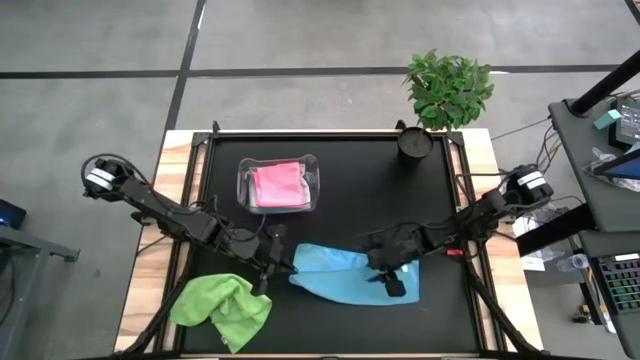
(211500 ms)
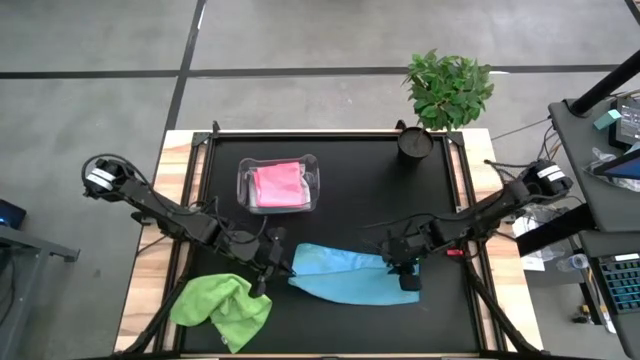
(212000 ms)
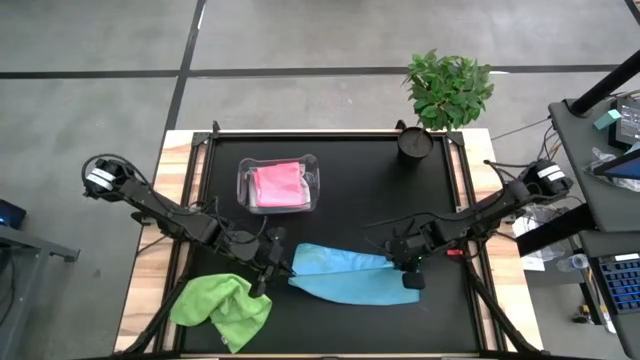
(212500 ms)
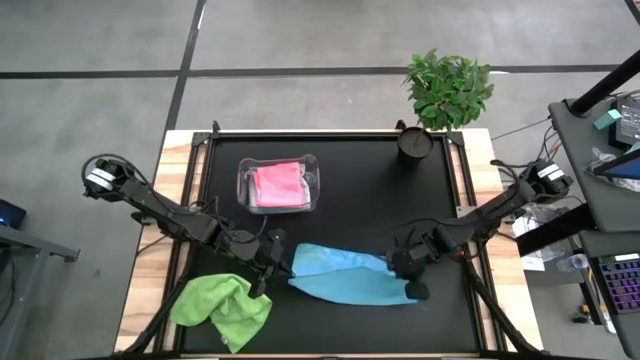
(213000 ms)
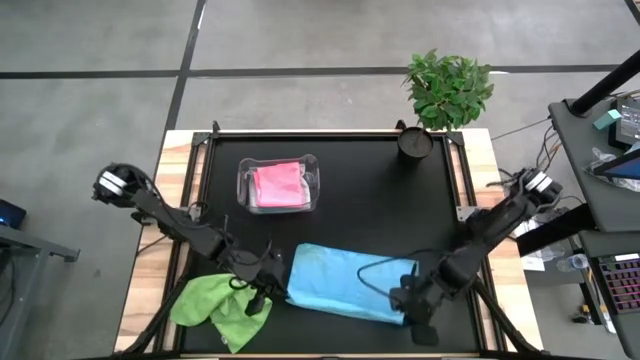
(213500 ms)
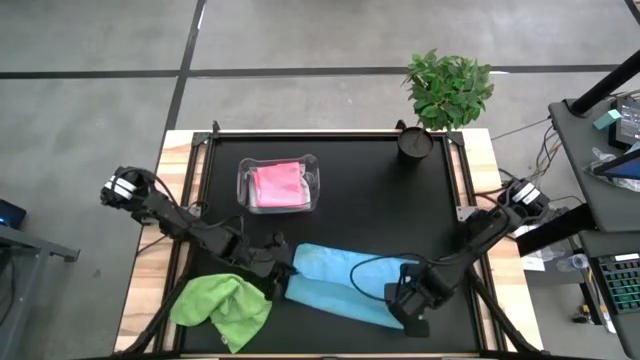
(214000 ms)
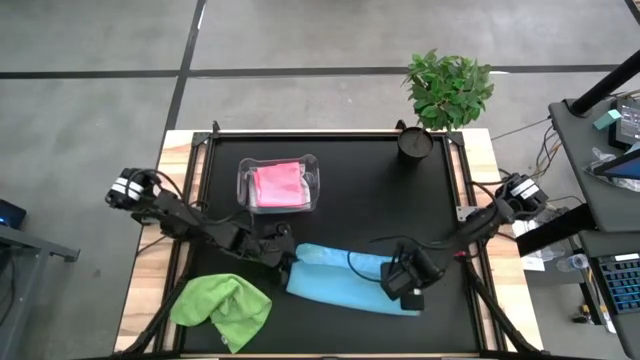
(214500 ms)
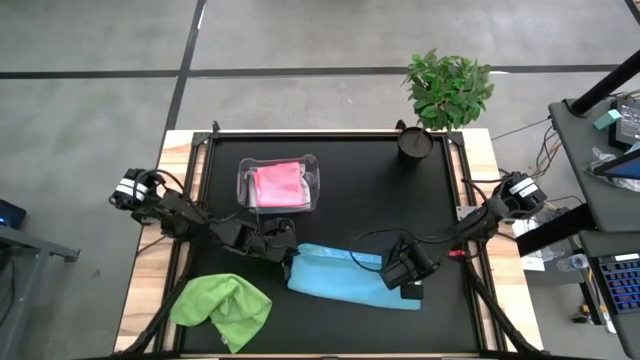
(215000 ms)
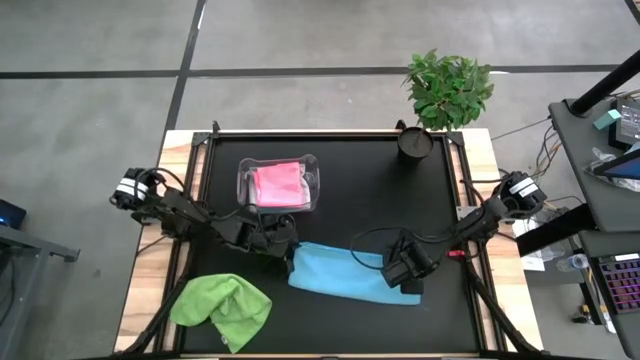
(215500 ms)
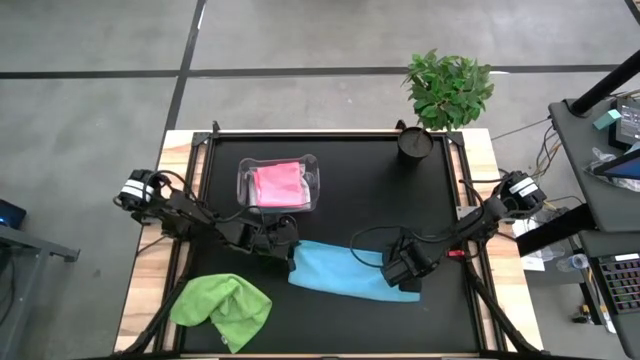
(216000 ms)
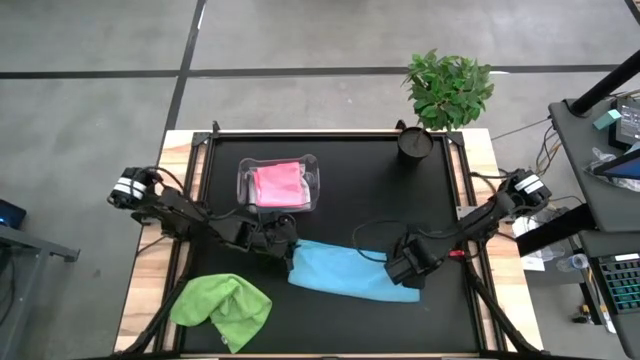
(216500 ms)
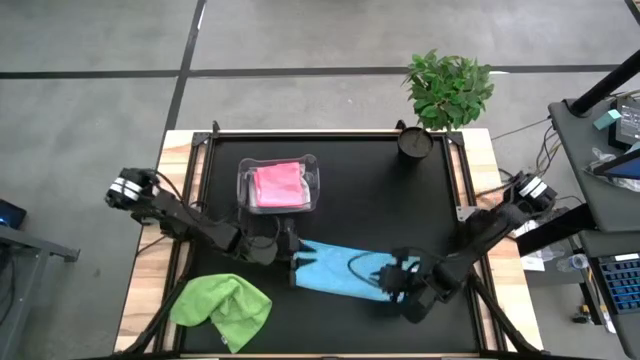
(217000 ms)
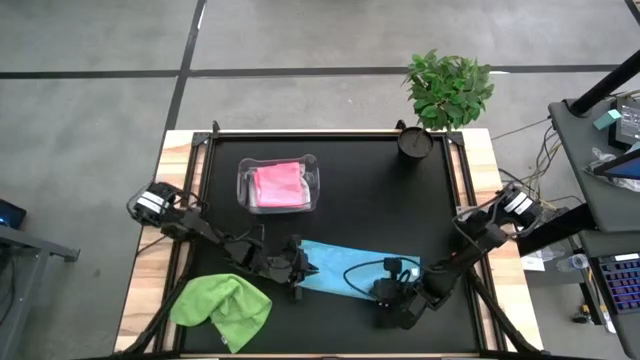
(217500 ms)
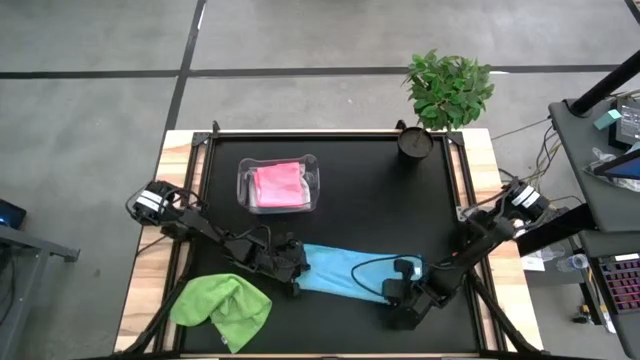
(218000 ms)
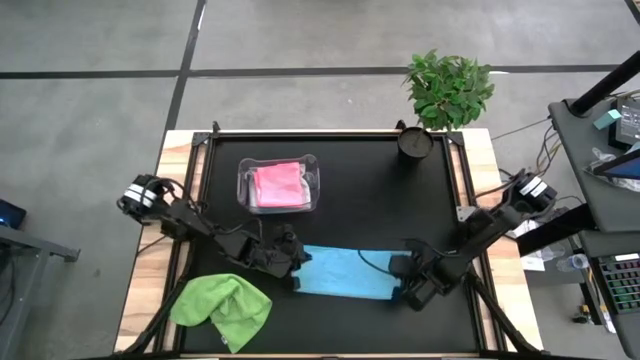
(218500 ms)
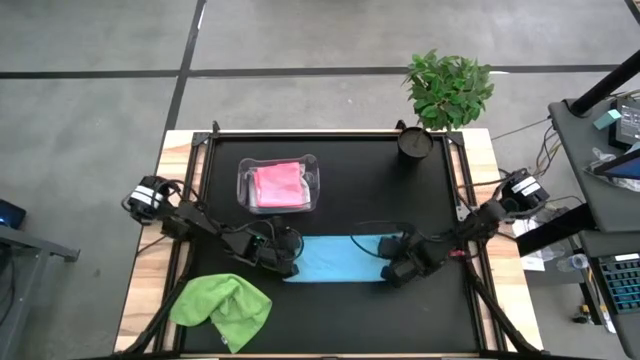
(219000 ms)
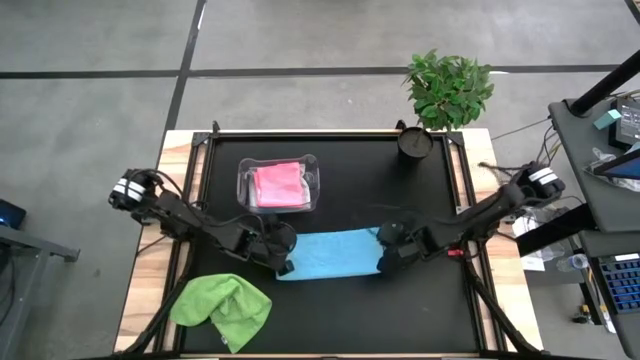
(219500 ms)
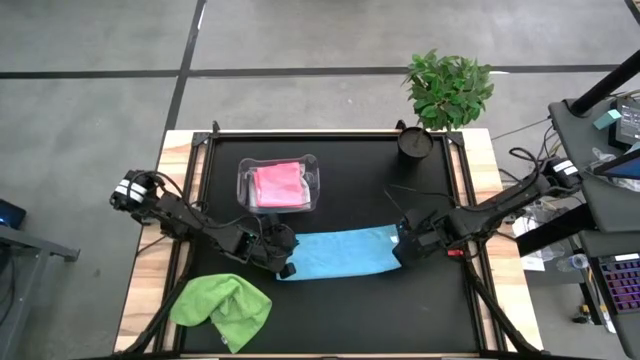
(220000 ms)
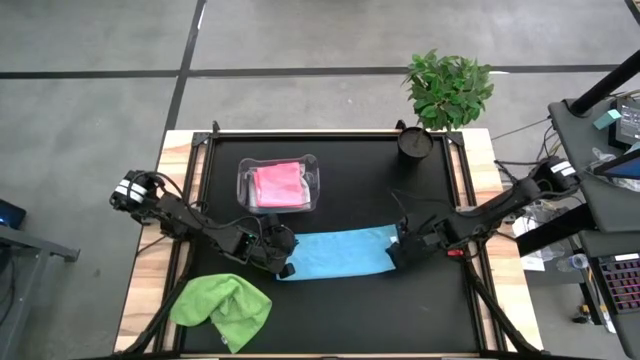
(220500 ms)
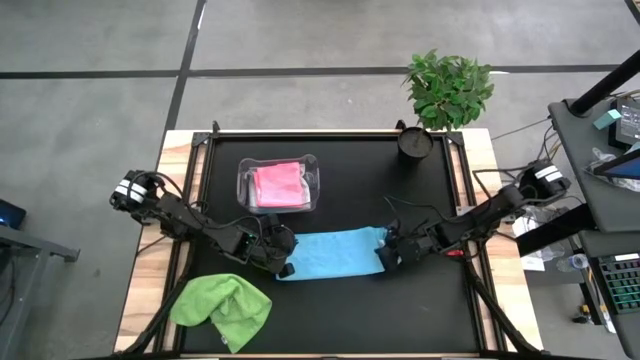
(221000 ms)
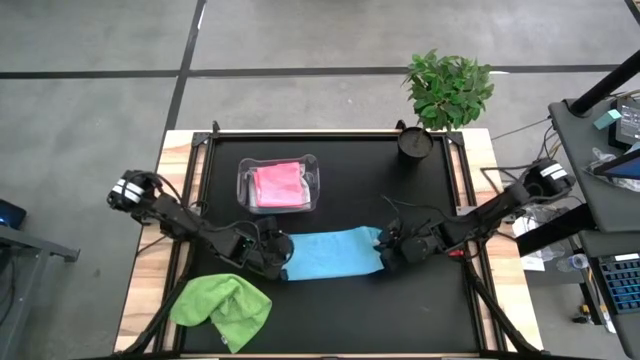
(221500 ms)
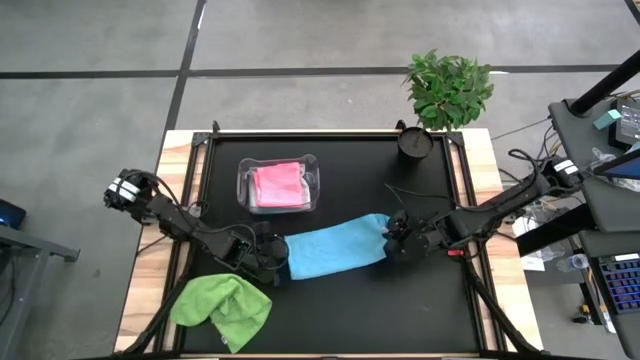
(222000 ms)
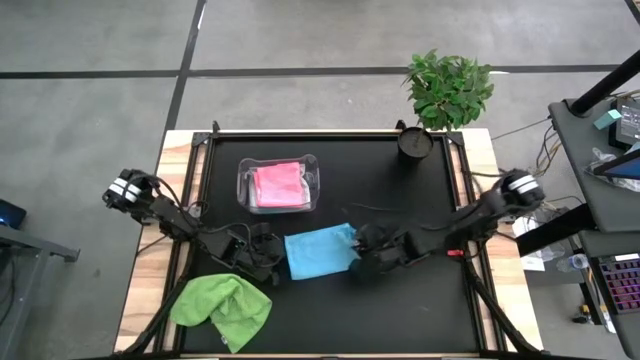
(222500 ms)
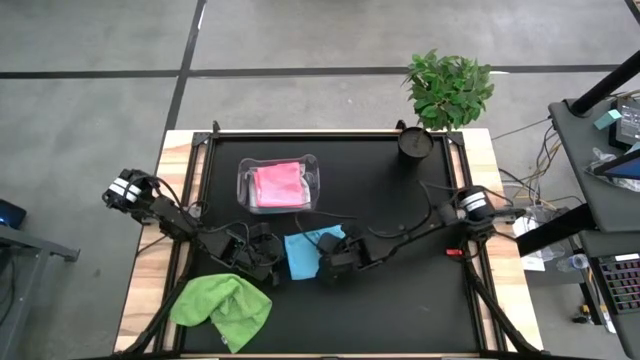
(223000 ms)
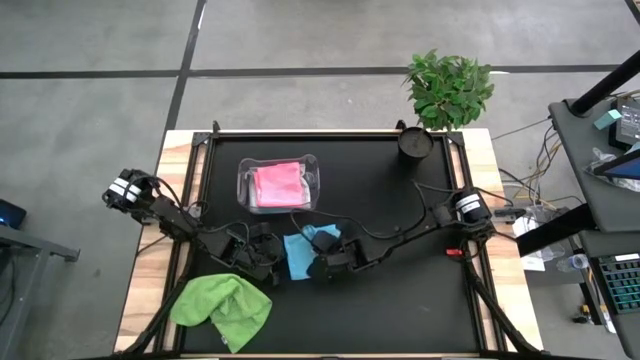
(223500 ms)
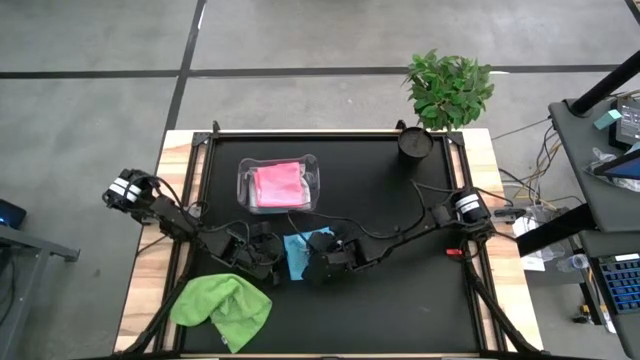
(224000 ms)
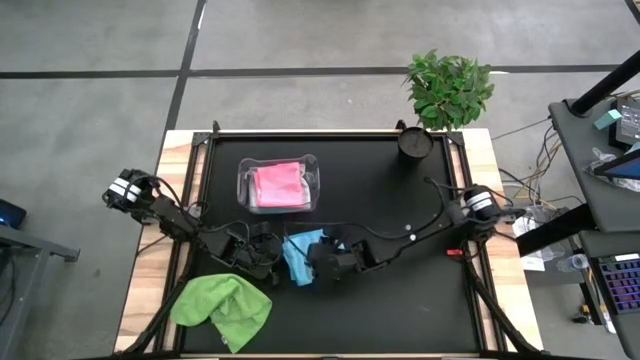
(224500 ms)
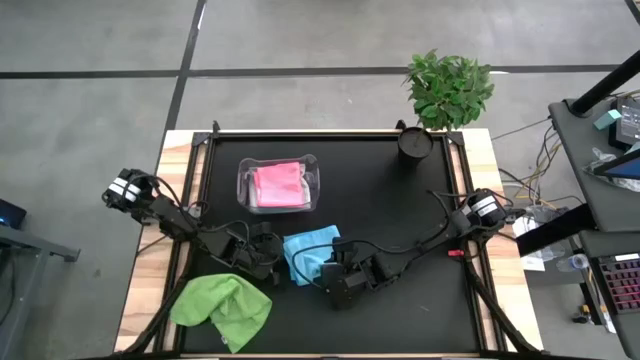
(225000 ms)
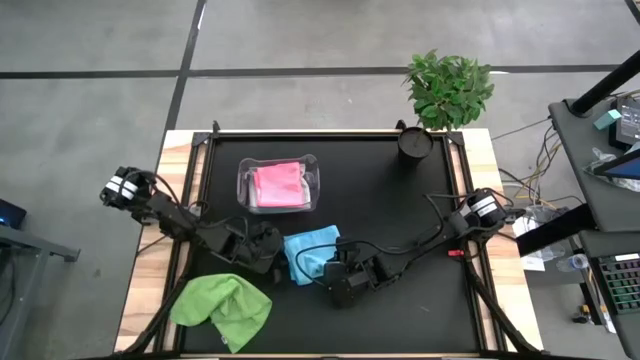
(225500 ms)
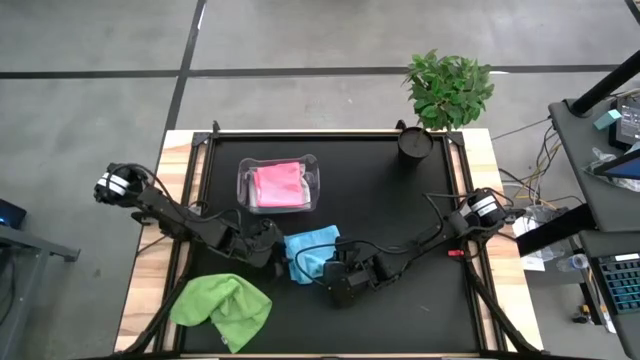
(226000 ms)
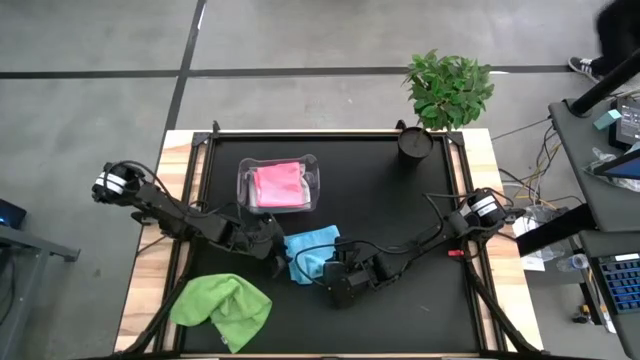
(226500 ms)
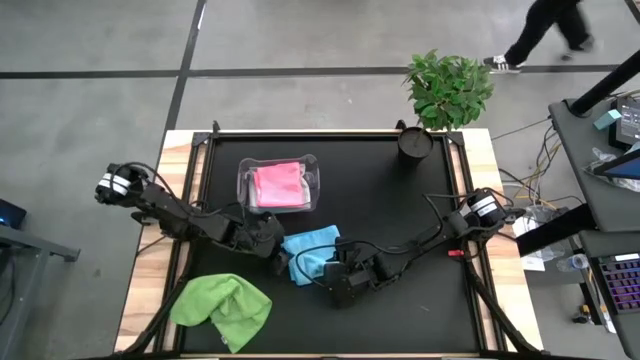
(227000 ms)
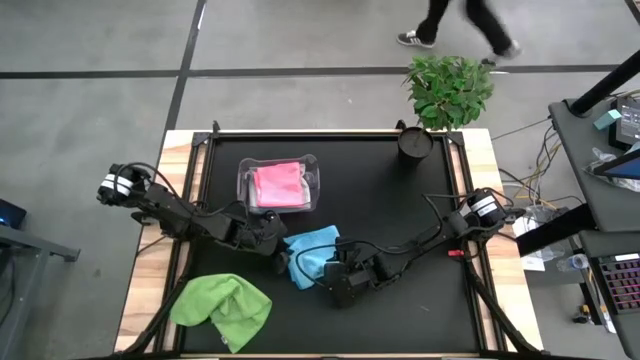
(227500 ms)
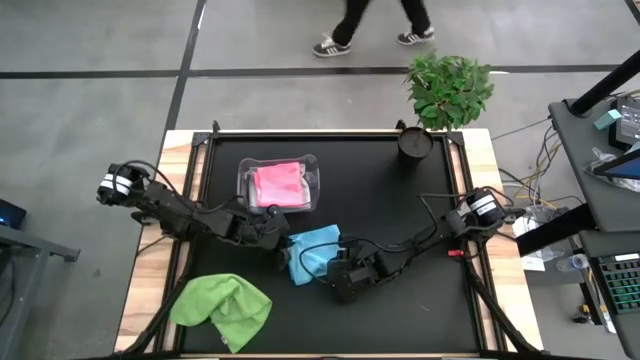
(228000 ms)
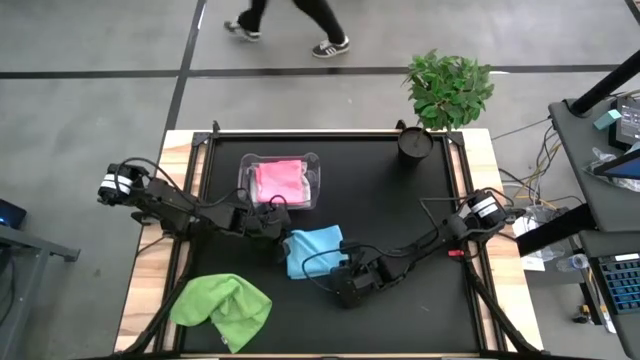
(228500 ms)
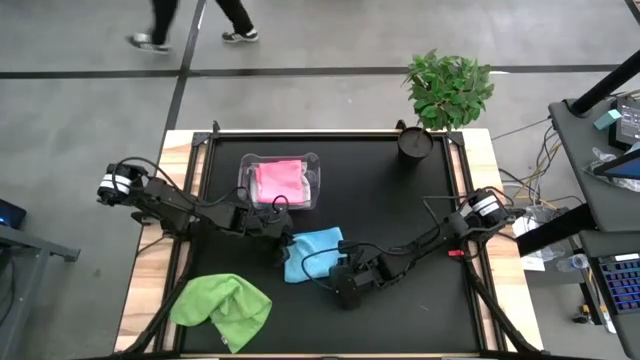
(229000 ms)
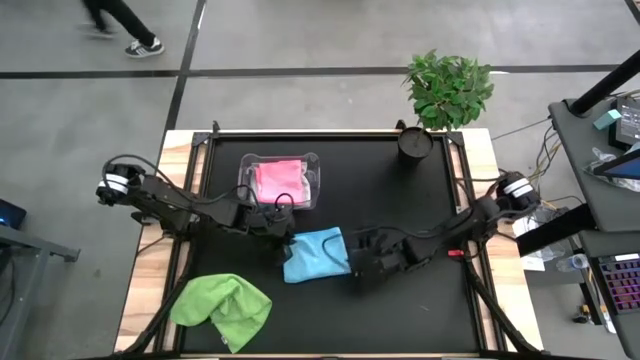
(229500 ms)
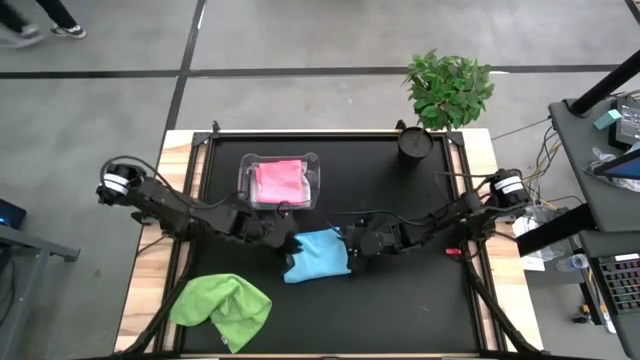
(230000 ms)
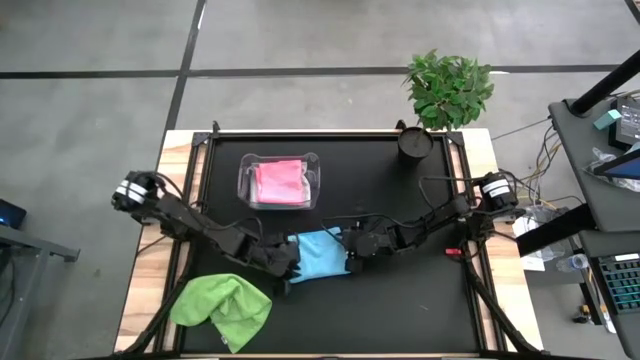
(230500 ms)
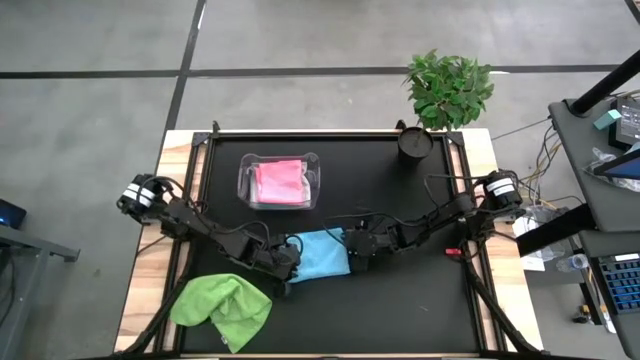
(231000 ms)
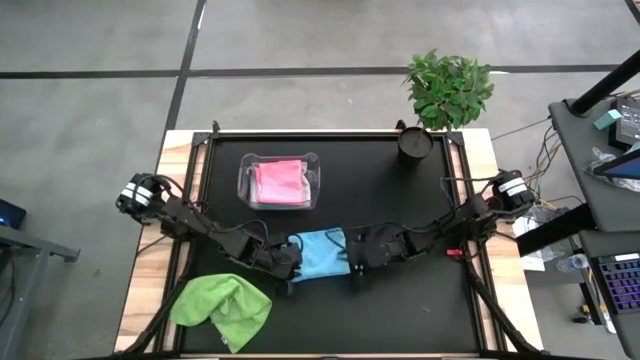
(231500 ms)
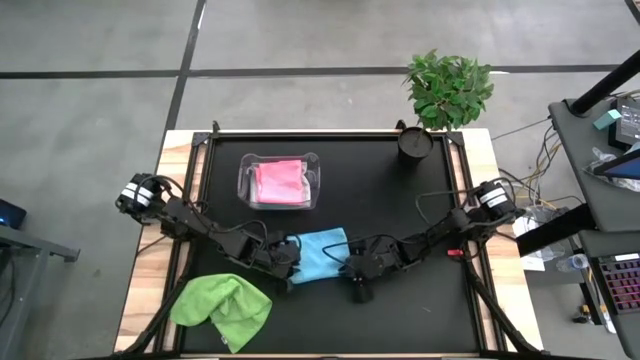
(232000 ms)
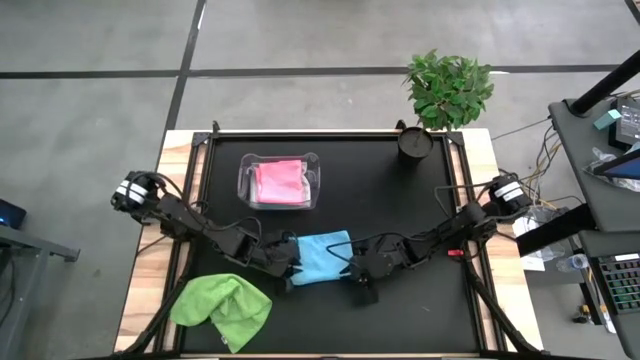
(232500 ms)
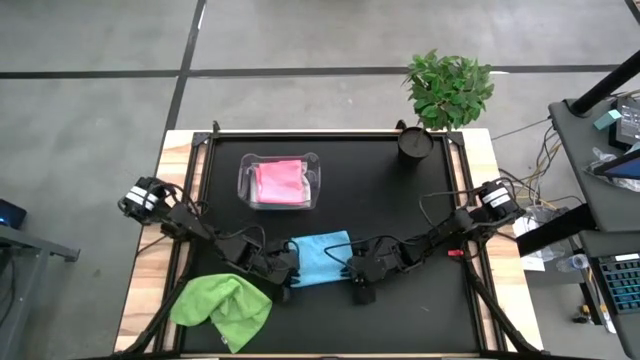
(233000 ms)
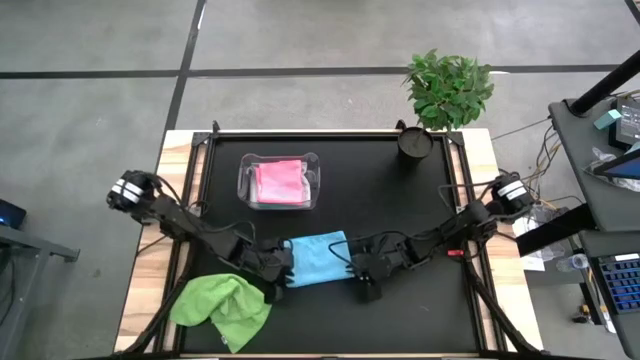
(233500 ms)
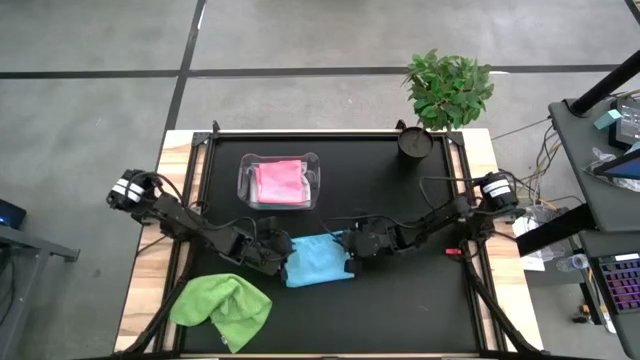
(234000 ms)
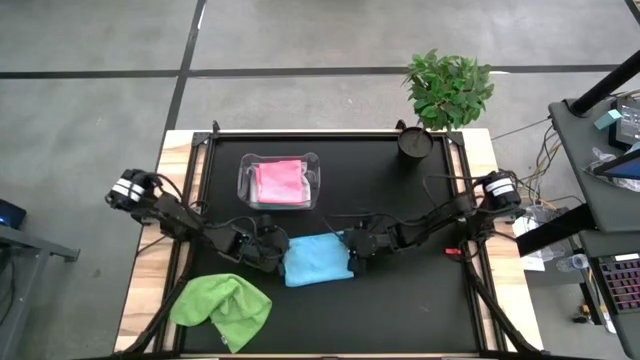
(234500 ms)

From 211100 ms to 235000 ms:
Task: Fold microfiber towels
Fold the blue microfiber cloth
